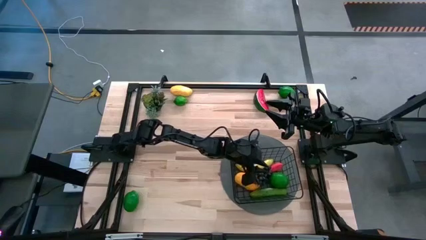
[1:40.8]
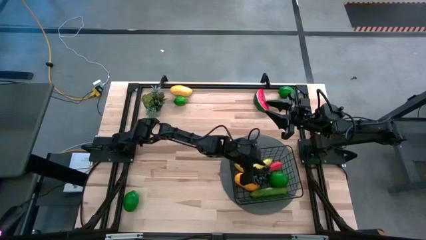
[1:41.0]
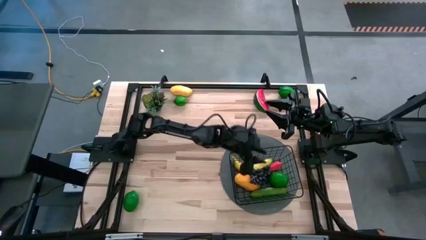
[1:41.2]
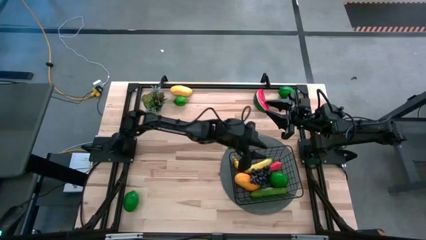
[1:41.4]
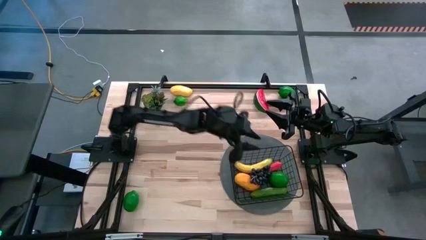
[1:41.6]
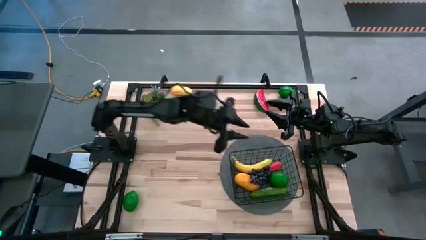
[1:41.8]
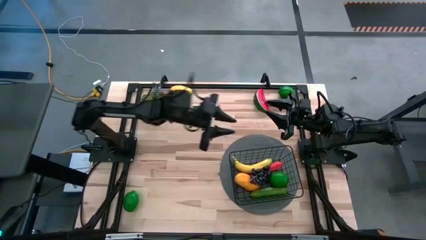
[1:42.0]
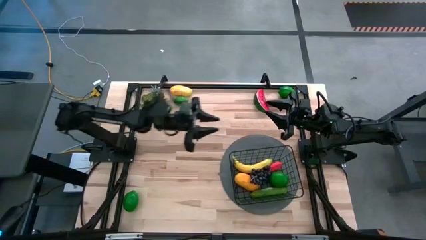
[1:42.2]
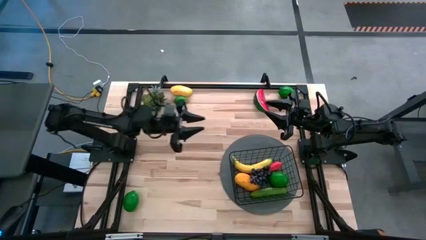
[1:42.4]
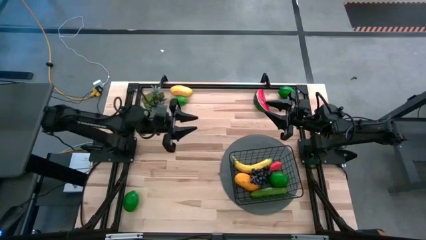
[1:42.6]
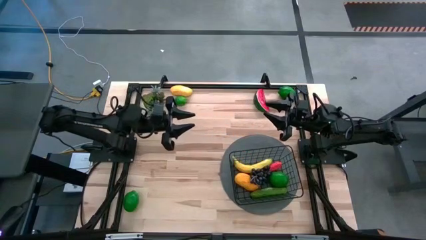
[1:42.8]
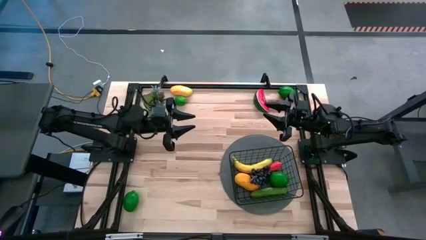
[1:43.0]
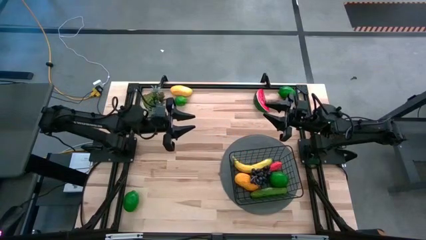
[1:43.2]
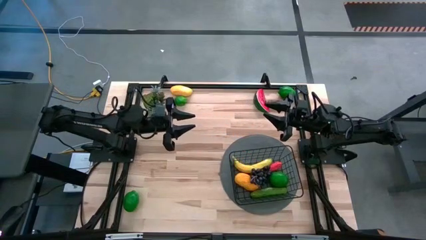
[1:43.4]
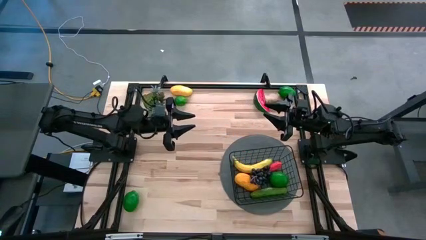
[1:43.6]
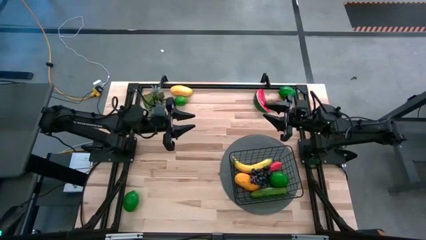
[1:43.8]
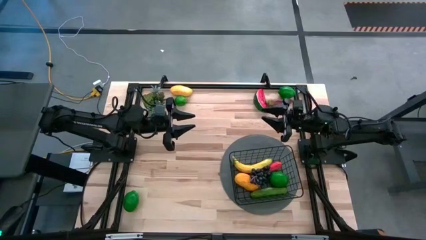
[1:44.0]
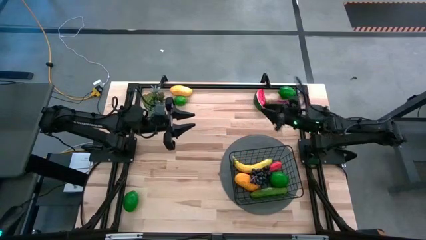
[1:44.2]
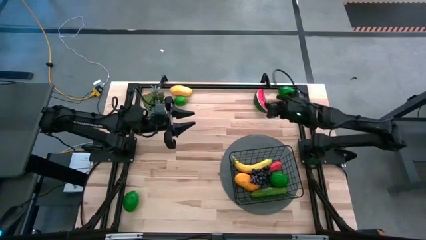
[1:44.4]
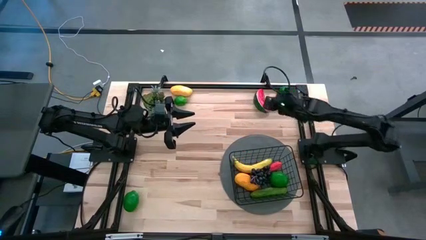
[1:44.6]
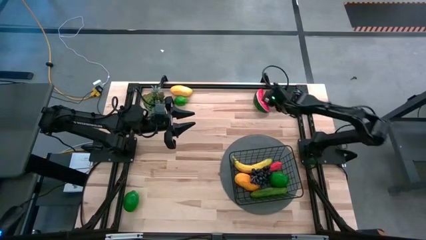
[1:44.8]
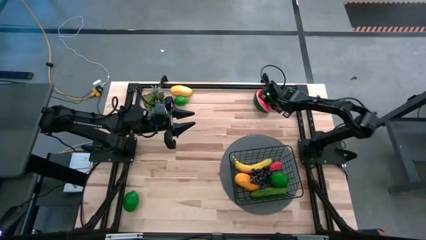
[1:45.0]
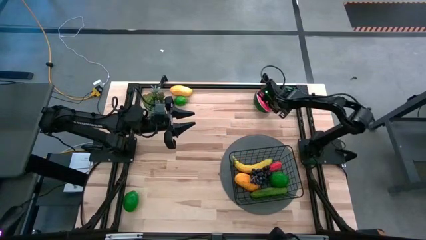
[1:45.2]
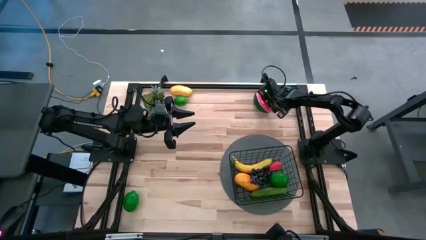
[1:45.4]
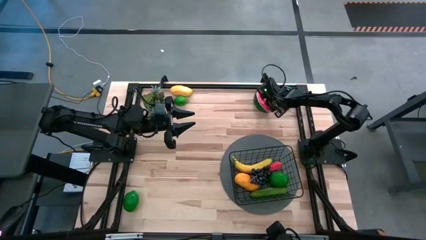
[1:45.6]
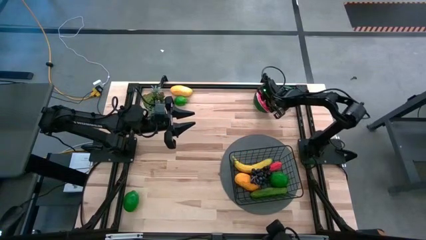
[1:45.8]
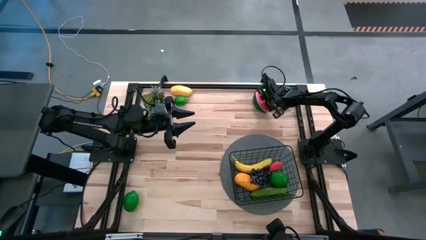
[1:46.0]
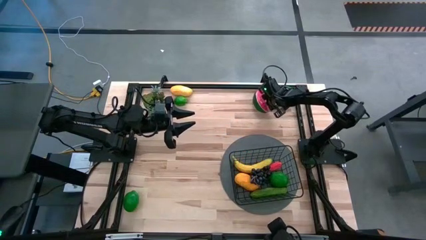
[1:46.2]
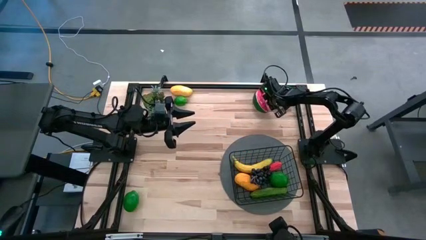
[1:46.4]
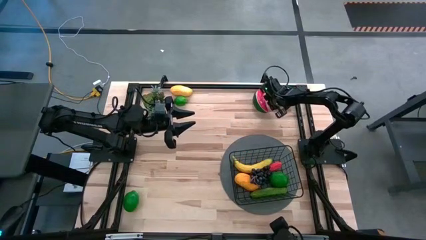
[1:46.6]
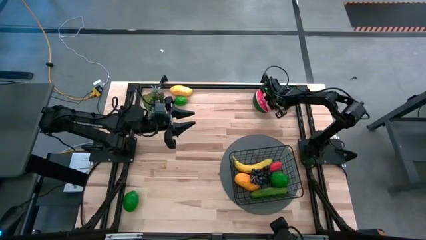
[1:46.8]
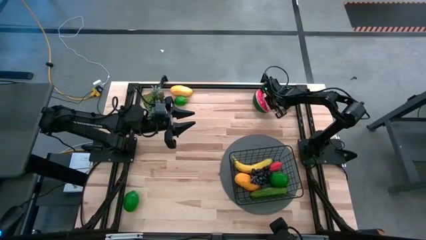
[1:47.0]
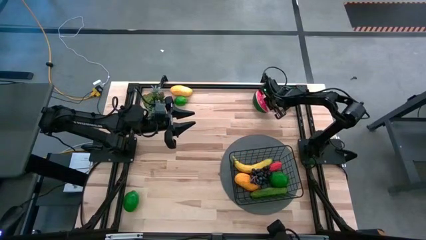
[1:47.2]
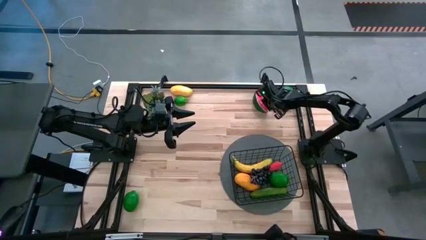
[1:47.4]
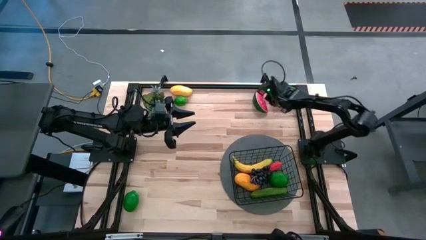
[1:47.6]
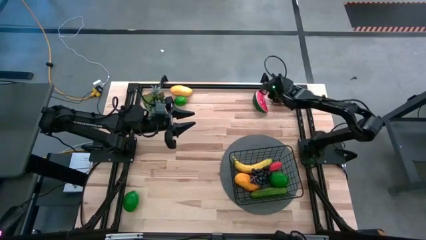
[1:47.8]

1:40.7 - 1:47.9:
Task: Build produce basket
Put the red chili pepper into the black basket

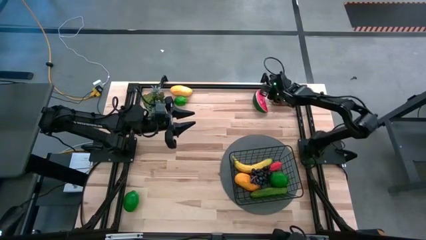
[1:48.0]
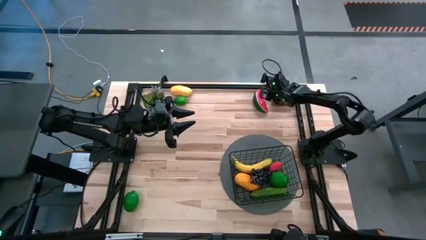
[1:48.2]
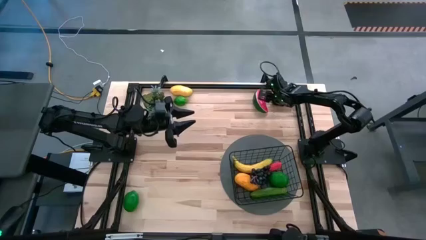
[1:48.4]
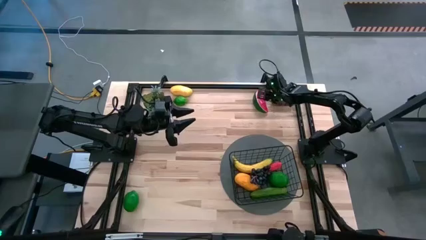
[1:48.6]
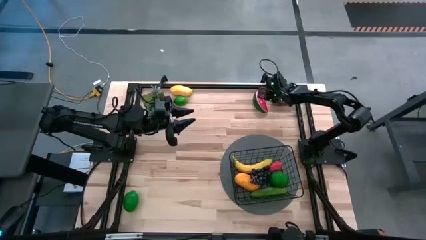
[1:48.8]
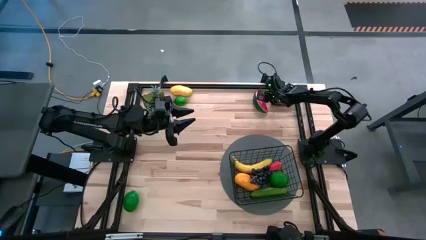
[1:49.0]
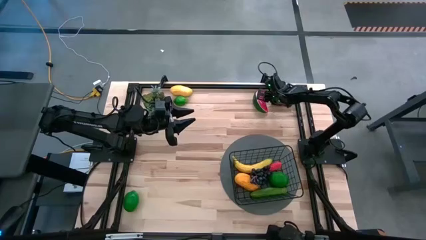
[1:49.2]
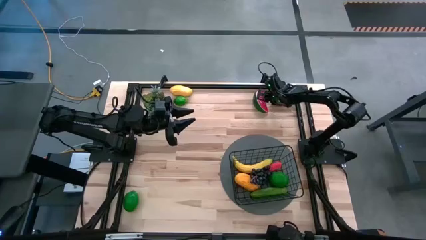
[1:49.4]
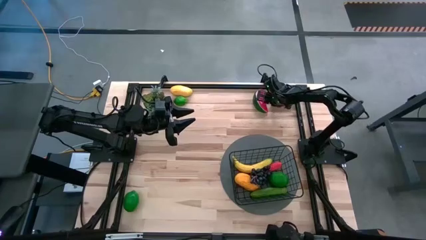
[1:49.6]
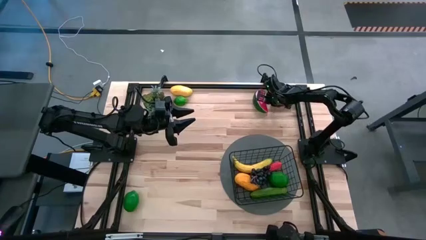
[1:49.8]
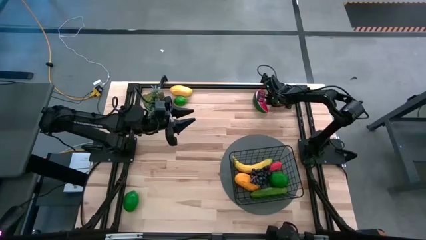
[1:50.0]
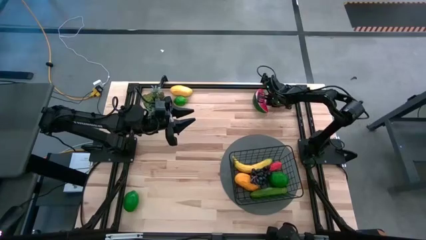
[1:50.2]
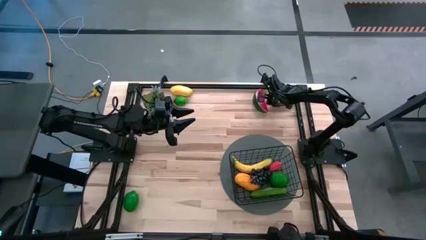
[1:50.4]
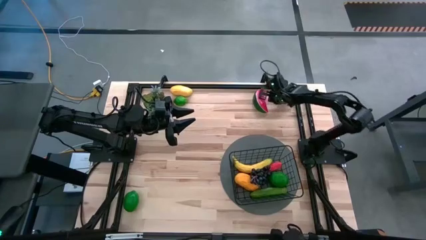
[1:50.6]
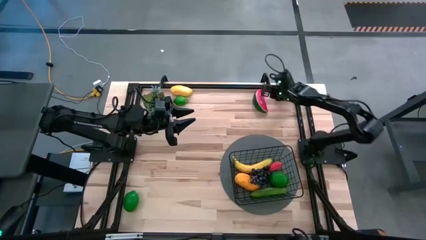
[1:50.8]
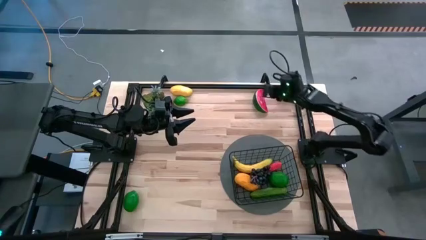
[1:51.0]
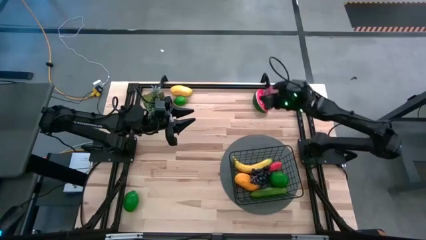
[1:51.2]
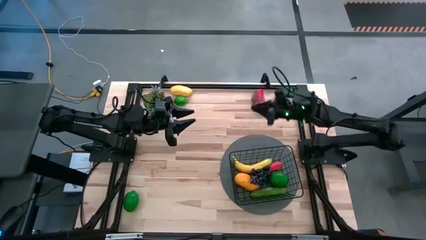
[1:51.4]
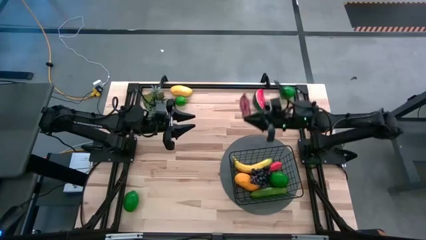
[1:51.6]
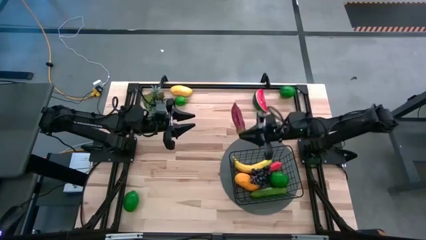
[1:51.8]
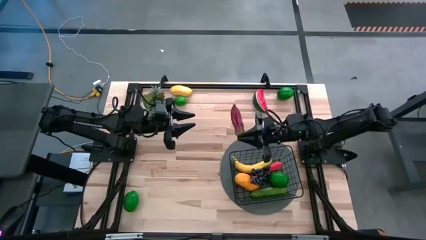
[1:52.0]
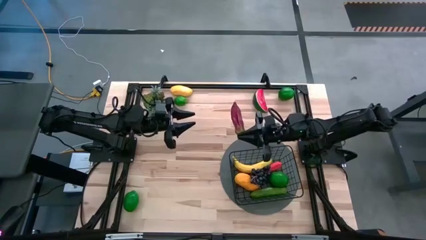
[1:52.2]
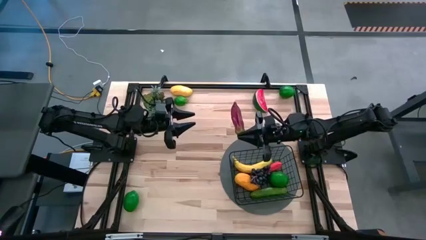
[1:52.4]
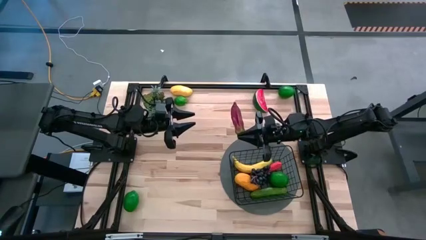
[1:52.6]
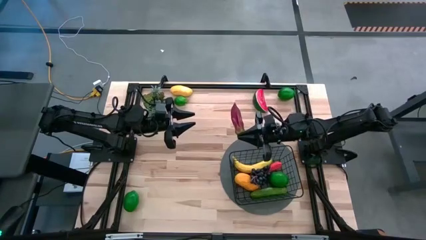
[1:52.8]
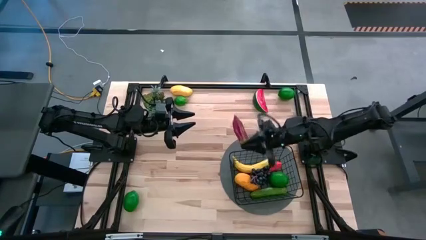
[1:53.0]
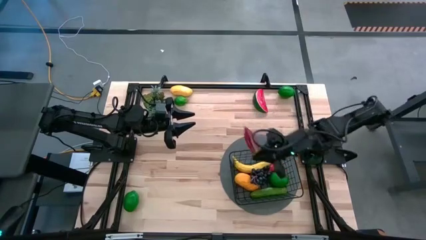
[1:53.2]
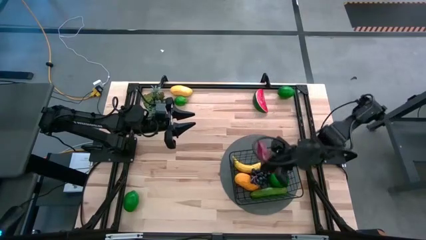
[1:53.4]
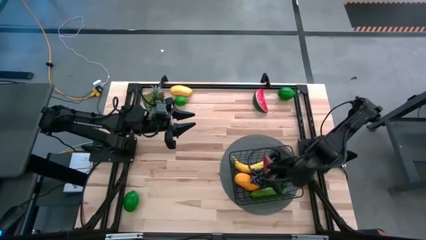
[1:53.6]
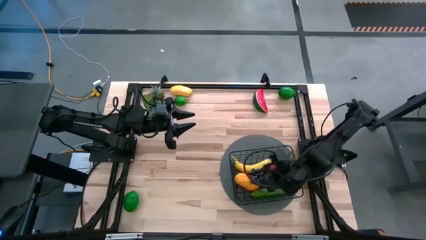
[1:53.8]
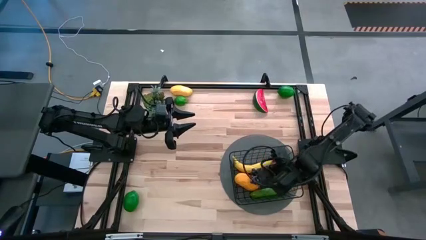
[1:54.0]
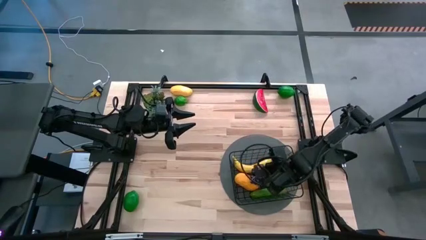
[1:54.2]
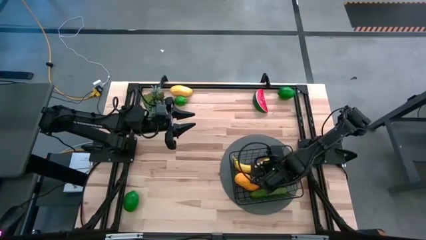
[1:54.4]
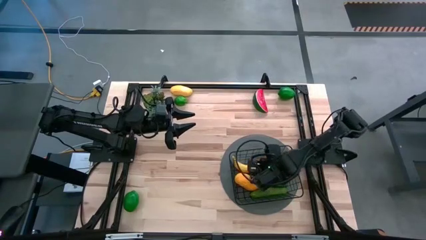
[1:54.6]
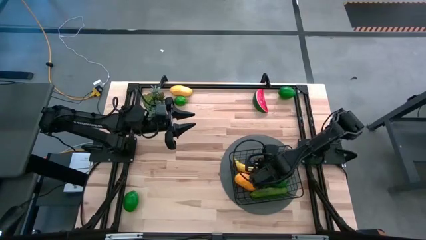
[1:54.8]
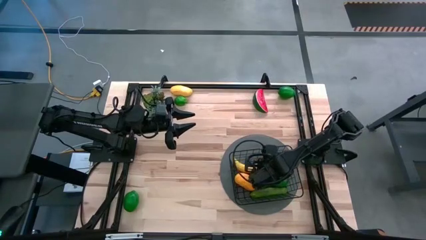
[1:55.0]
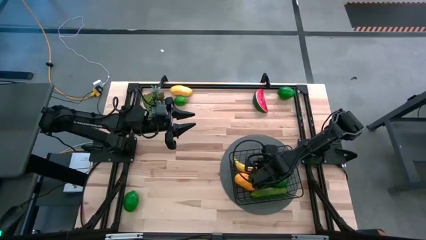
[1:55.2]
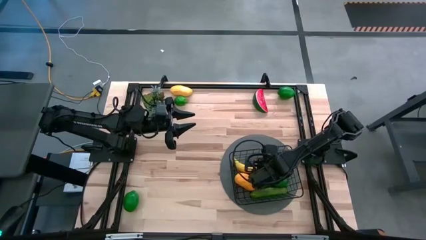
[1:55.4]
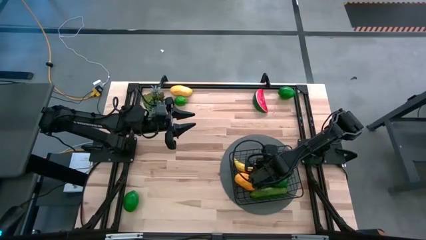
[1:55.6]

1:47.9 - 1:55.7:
Put the red chili pepper into the black basket

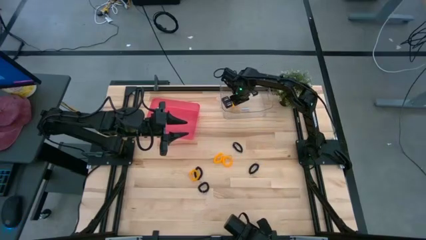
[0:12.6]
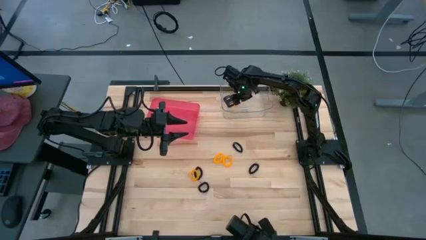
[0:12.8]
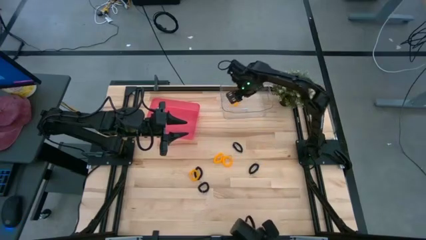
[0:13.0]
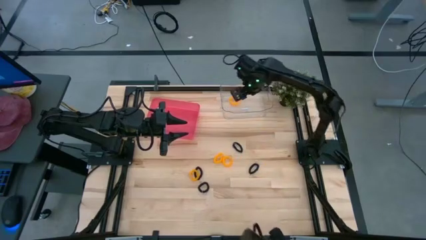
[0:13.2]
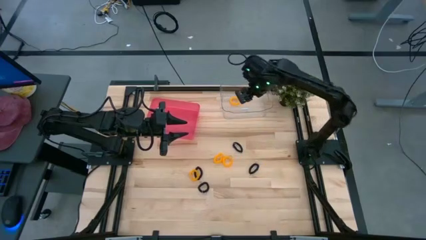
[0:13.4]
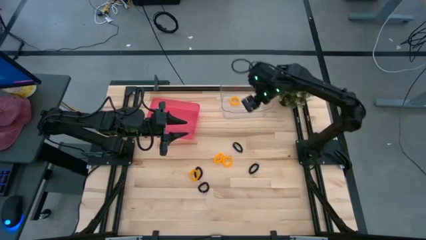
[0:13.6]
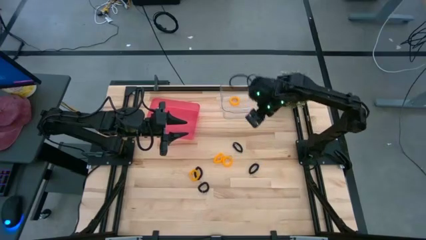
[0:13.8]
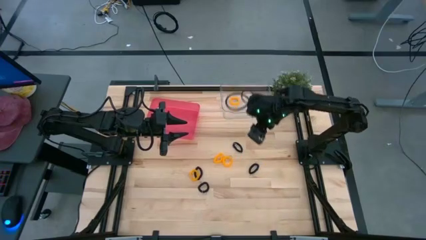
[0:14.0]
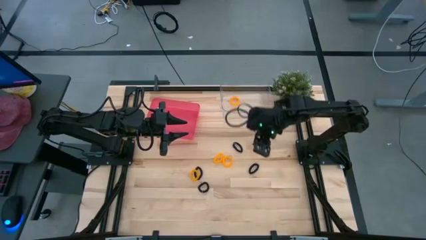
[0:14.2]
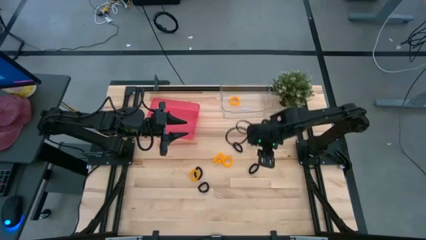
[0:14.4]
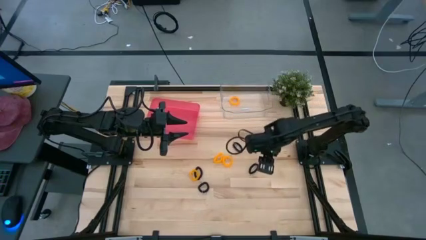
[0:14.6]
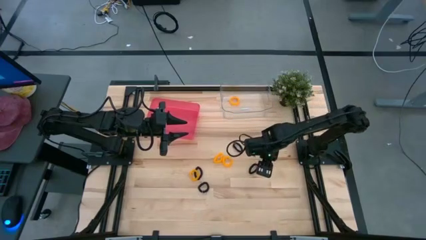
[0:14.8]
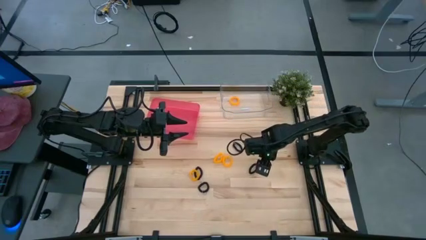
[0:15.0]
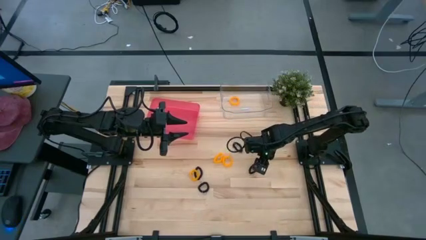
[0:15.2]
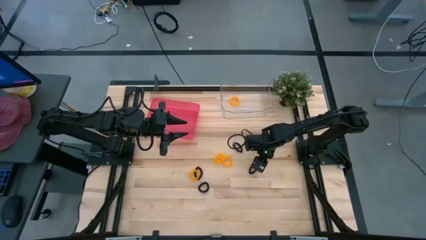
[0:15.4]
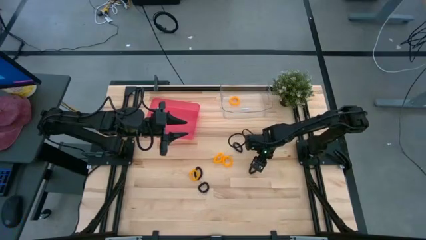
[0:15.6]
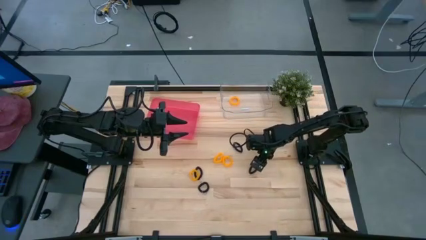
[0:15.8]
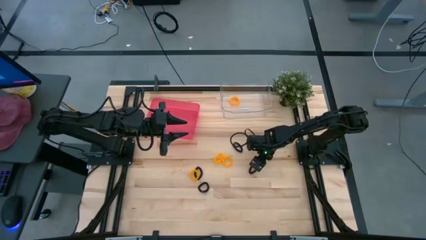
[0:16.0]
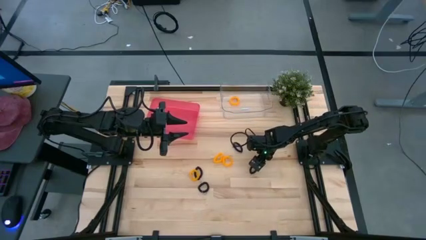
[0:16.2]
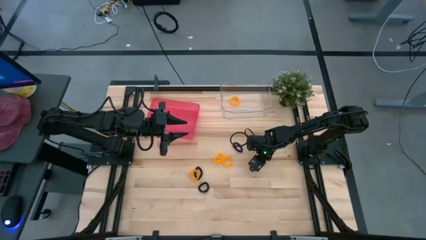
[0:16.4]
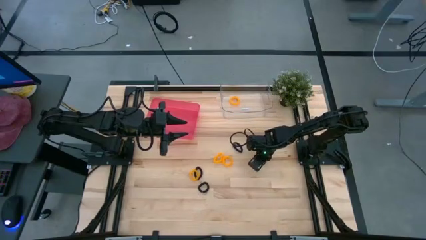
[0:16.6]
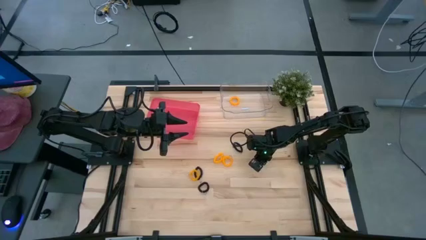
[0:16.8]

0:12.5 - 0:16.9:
Task: Sort spring keychains
Put the black spring keychain into the pink bin
